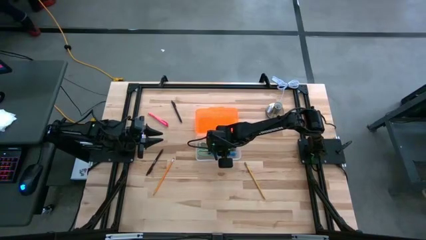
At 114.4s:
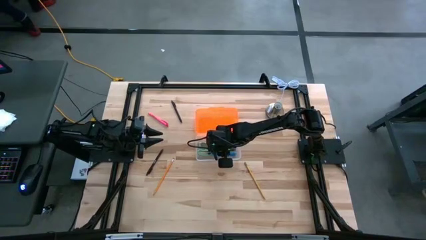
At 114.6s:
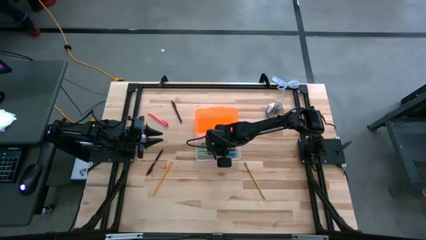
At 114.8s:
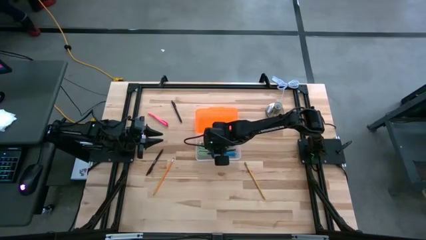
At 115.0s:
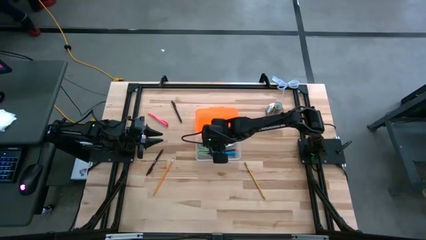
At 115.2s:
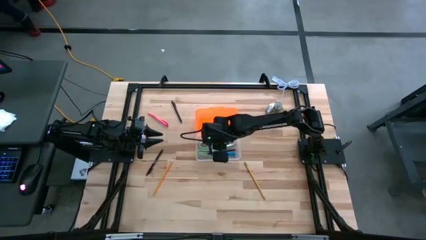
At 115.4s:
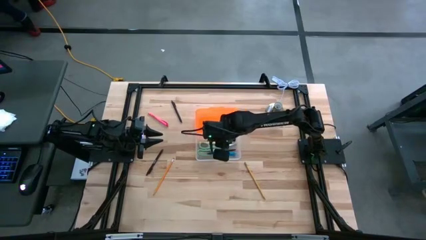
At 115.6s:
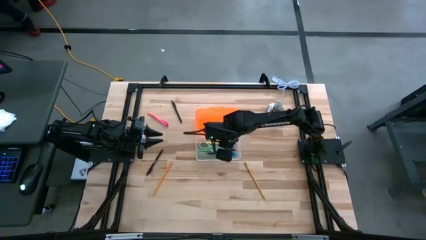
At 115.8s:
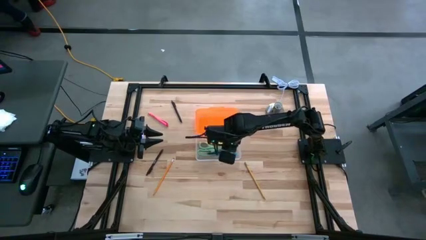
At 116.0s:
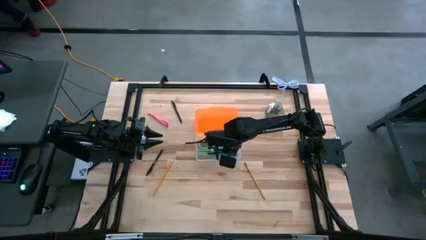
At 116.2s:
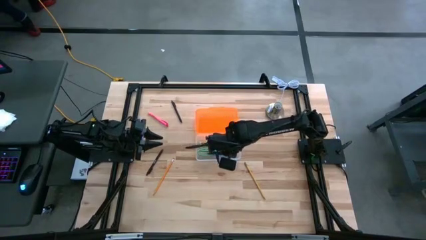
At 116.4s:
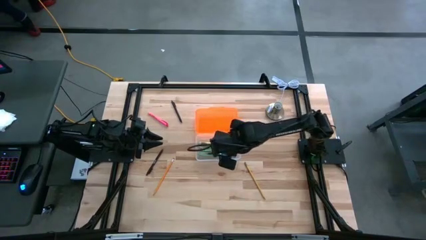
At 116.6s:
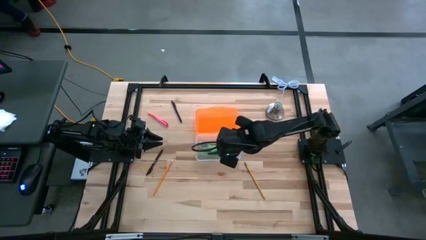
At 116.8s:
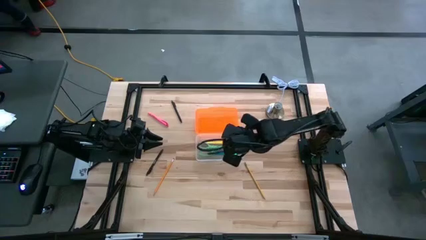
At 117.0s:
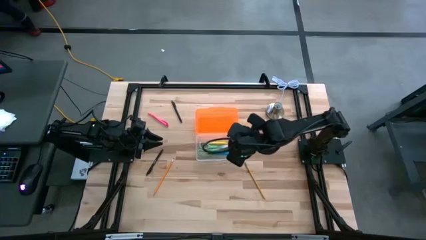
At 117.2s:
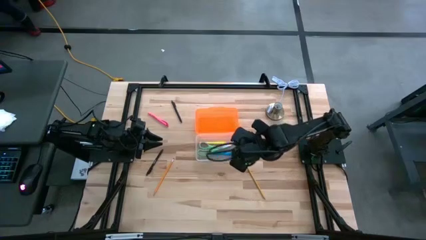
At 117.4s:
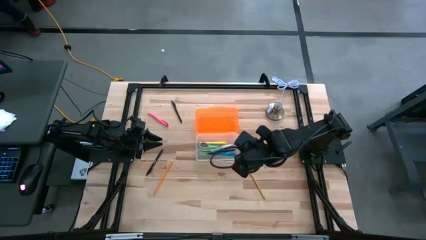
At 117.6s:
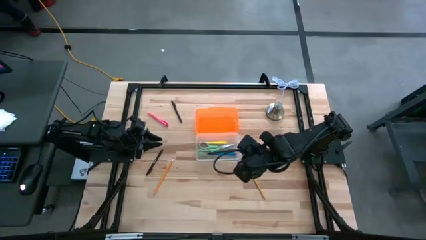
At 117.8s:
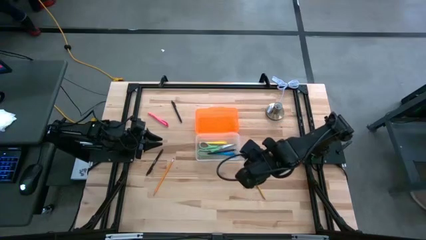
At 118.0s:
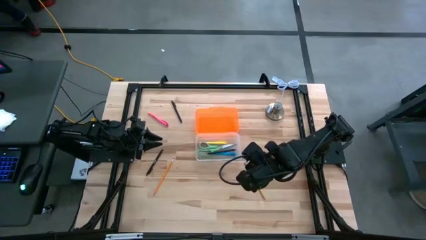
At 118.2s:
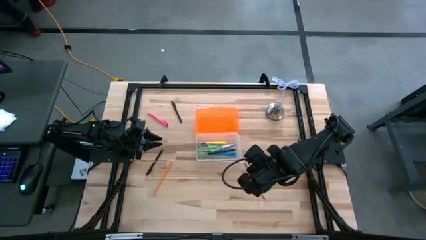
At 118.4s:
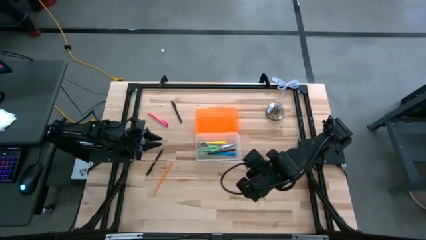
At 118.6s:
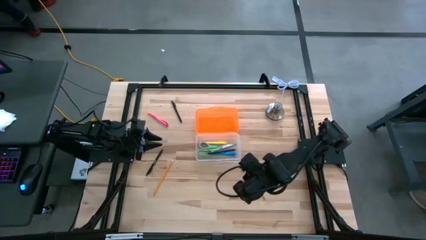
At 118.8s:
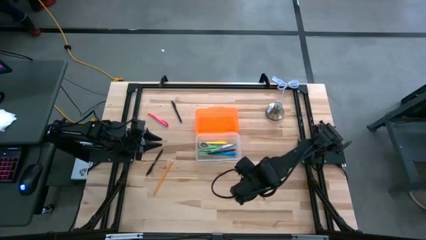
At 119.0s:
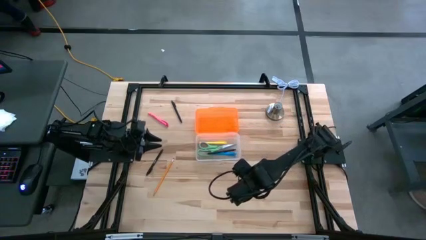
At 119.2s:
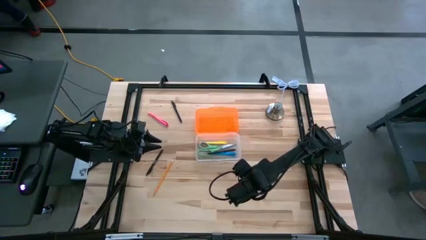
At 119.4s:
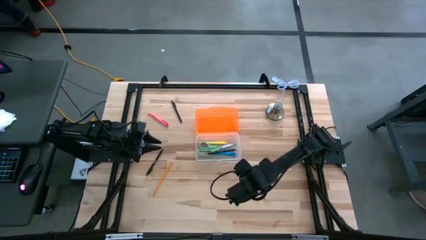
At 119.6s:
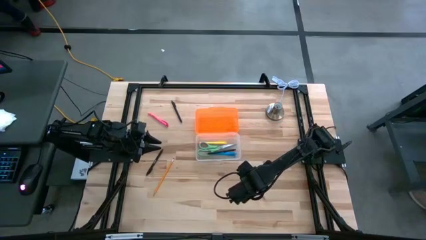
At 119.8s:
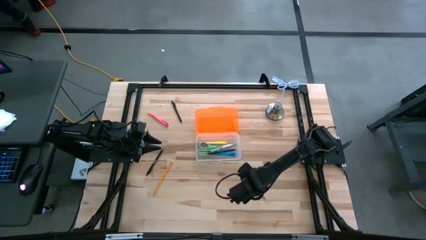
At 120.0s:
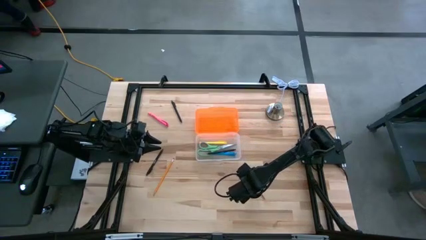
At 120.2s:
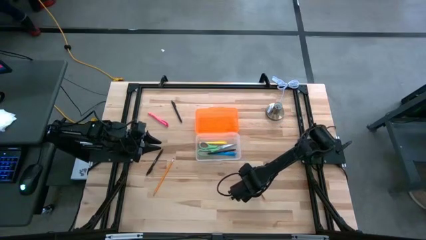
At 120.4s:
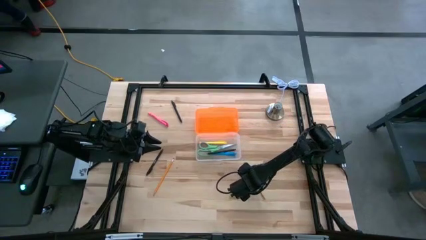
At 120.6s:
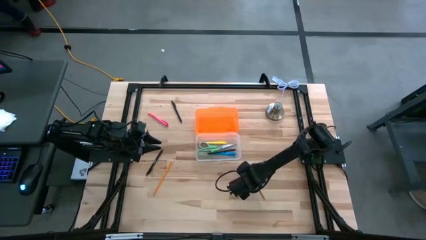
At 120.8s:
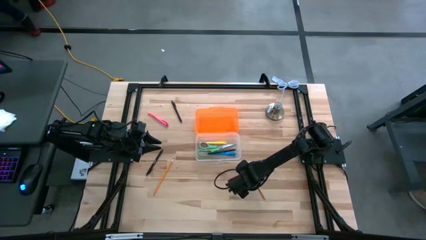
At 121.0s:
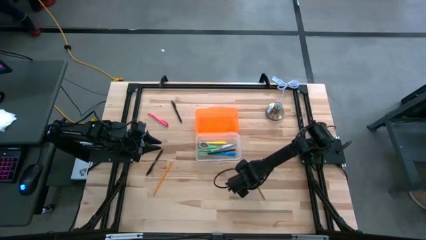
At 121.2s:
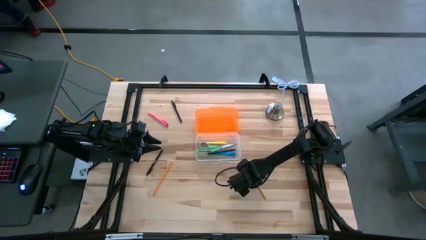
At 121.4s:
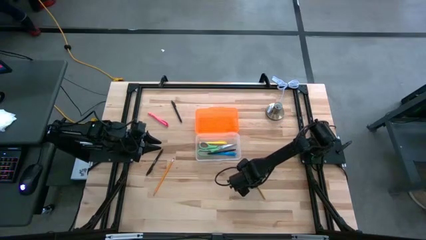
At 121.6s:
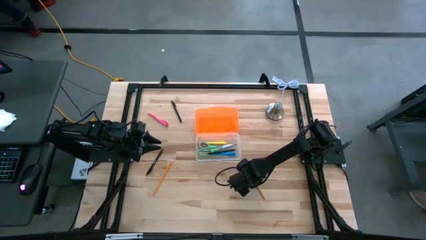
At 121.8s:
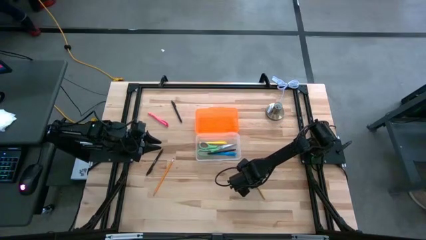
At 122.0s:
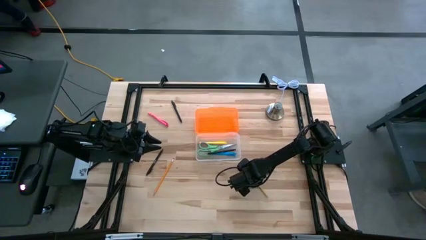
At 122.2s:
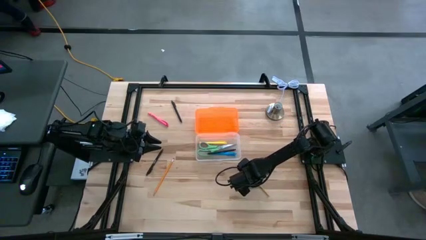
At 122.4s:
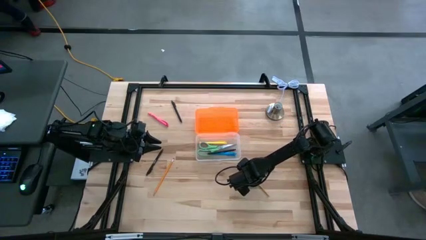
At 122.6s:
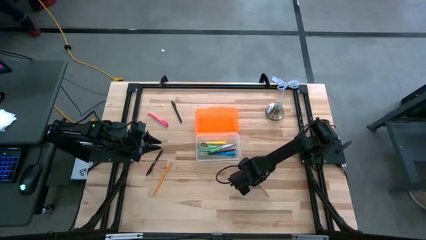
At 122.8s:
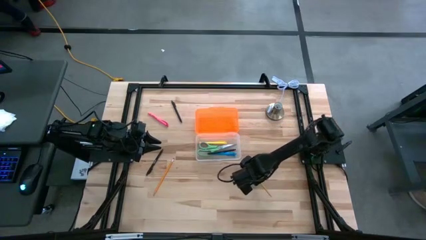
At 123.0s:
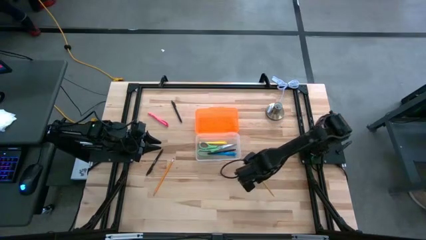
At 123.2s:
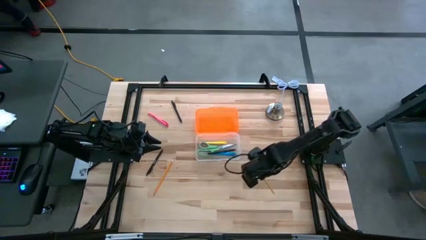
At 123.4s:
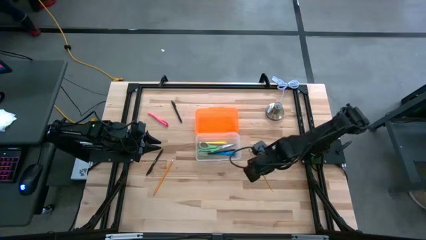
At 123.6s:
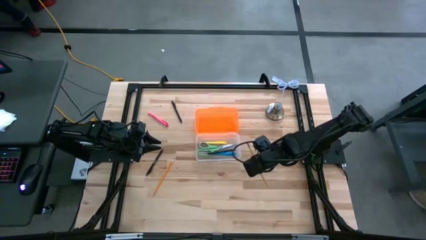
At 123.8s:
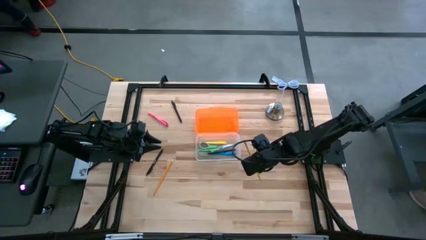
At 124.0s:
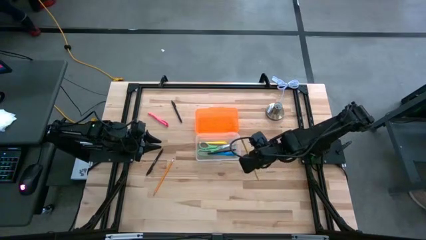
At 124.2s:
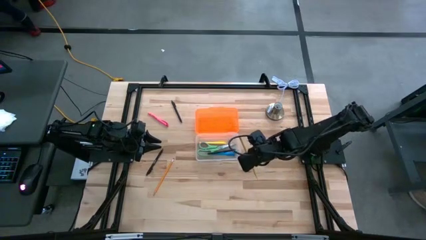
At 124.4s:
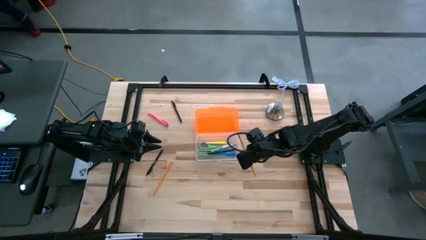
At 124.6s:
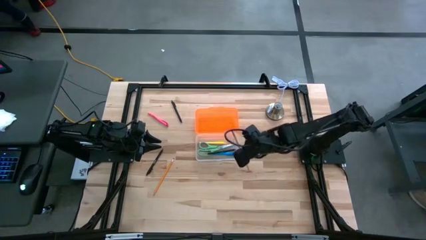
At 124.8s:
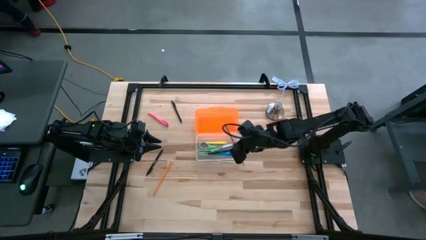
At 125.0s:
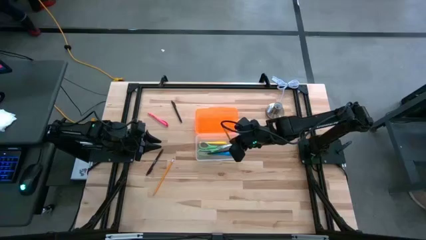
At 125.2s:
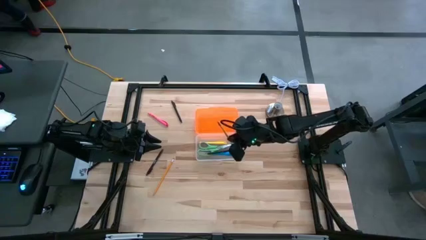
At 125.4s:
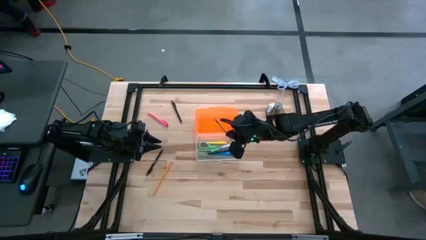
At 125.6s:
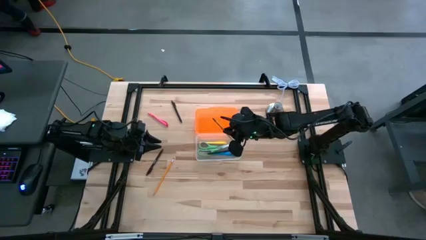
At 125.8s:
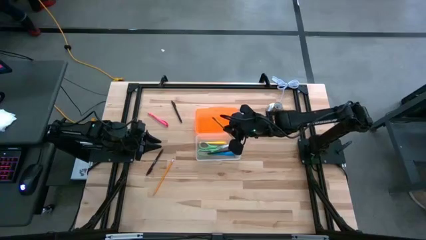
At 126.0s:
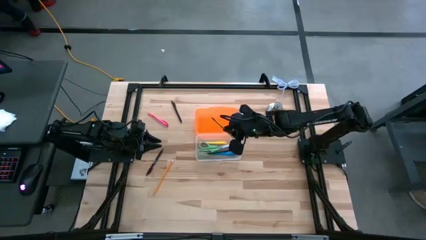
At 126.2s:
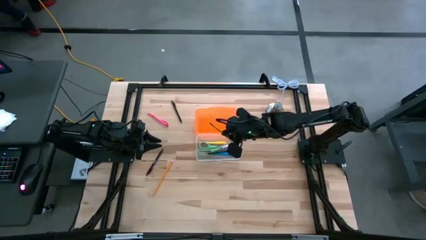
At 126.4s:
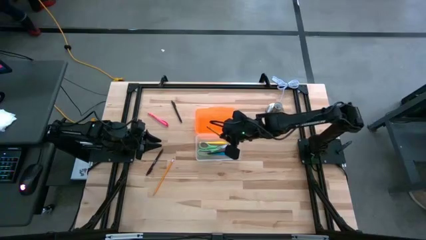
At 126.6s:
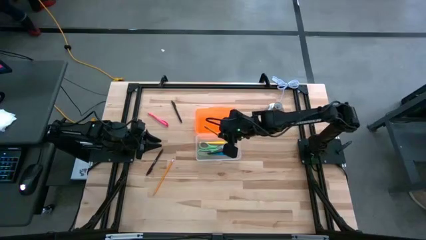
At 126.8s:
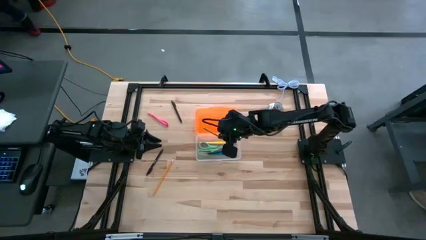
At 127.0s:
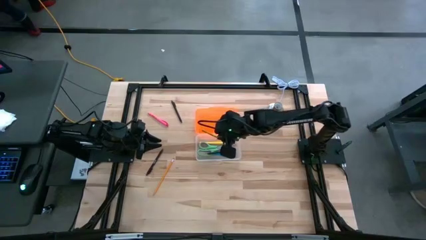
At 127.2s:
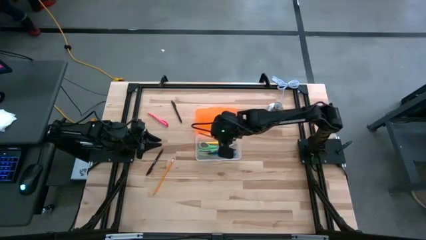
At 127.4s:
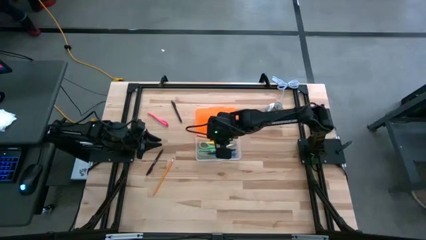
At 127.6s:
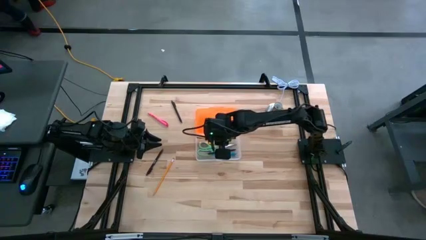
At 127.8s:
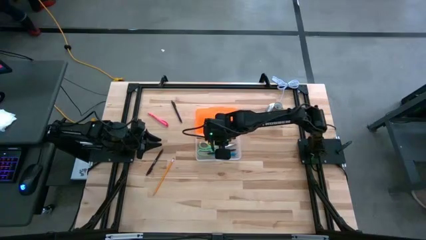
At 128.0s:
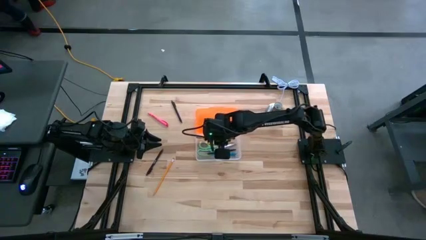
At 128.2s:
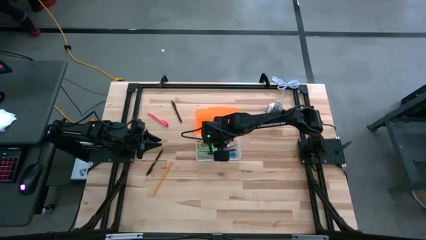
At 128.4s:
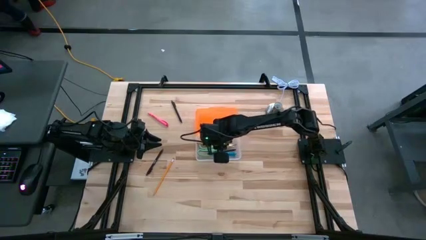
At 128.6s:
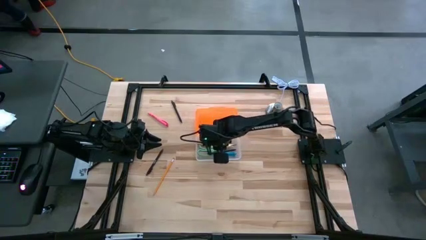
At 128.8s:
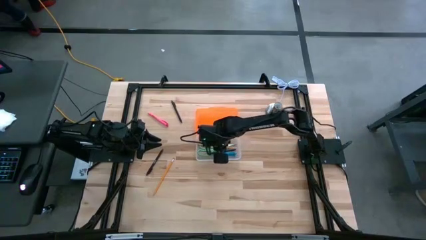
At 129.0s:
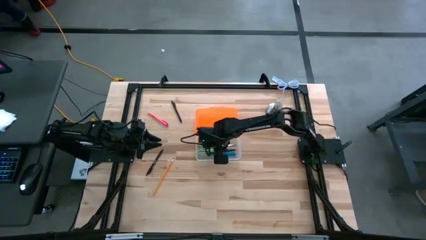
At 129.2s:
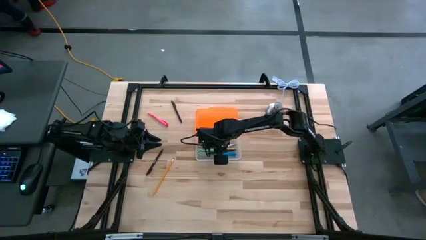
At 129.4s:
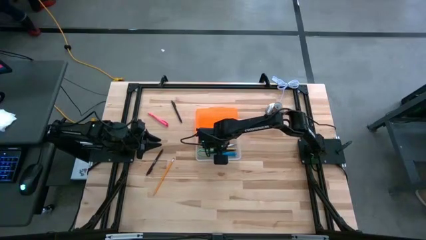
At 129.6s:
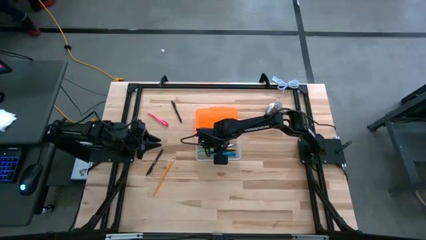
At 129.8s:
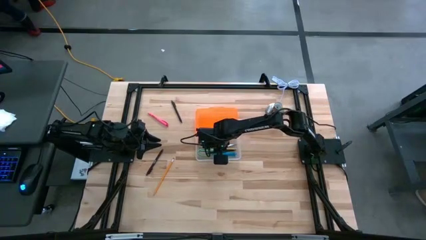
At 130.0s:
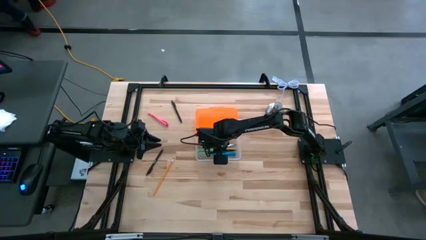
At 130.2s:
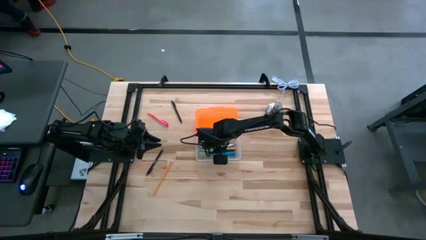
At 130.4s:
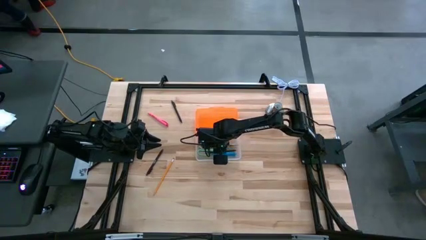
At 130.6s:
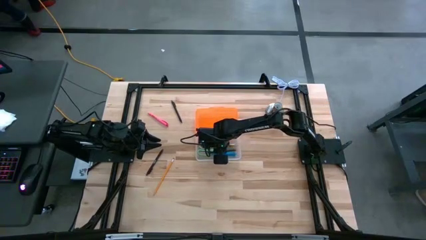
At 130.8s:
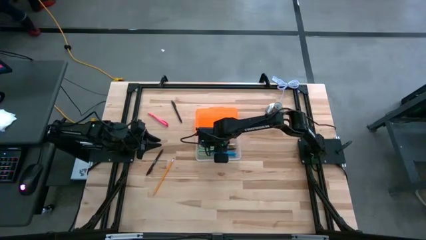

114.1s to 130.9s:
Task: Pick & place school supplies into a supply box
Put the yellow pencil into the orange supply box
